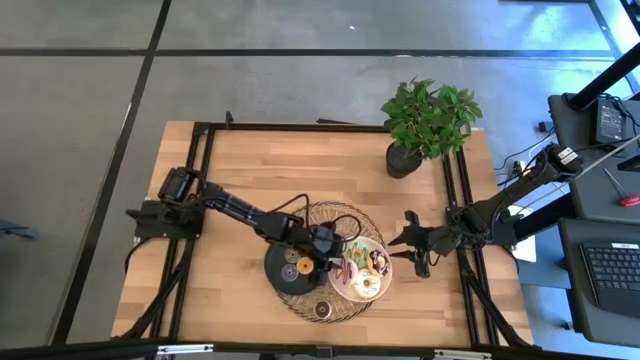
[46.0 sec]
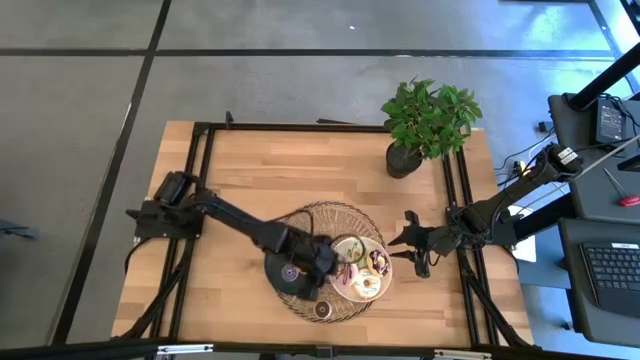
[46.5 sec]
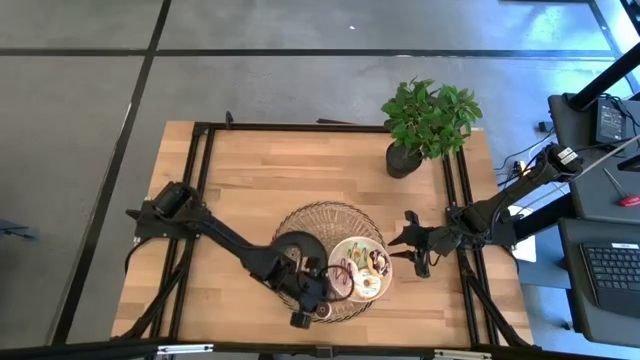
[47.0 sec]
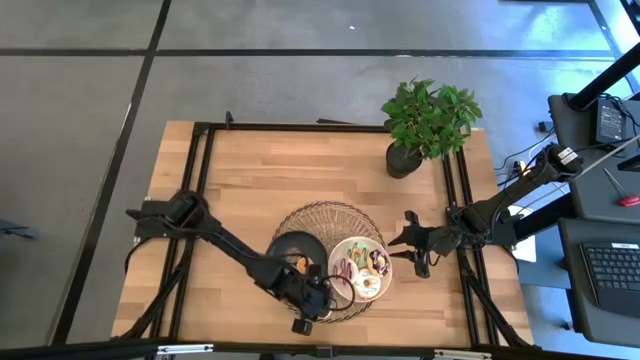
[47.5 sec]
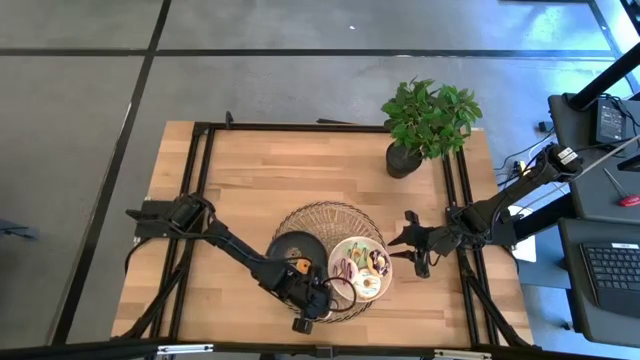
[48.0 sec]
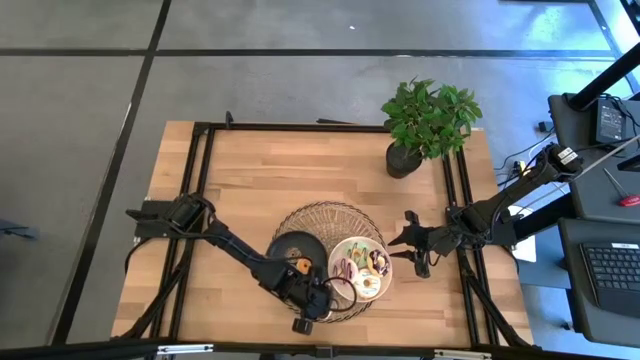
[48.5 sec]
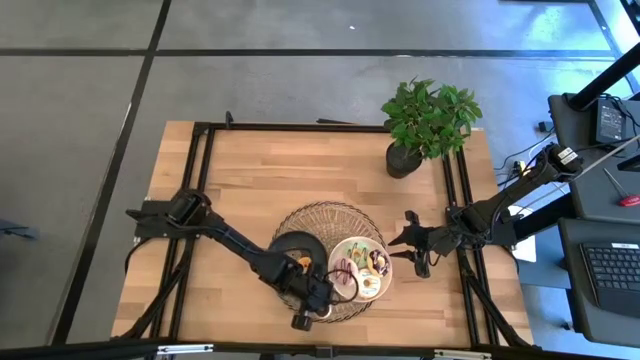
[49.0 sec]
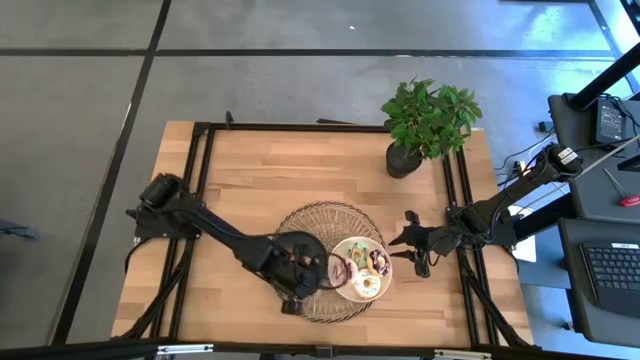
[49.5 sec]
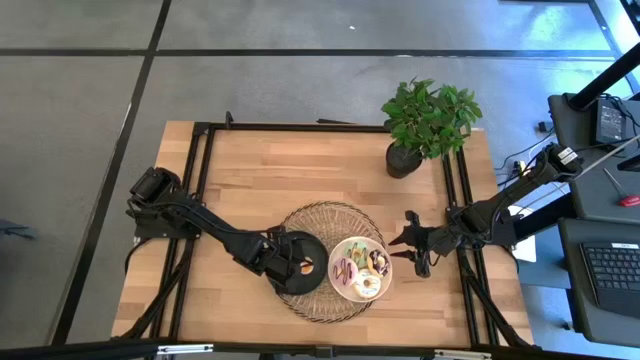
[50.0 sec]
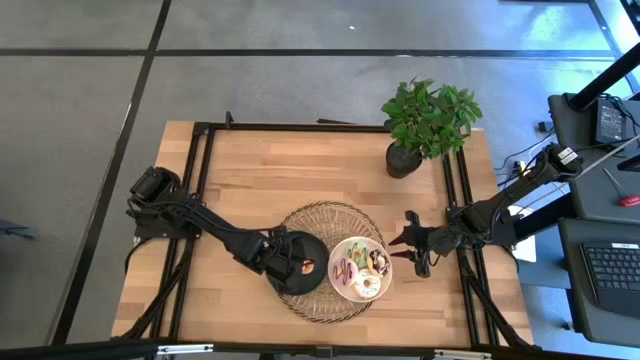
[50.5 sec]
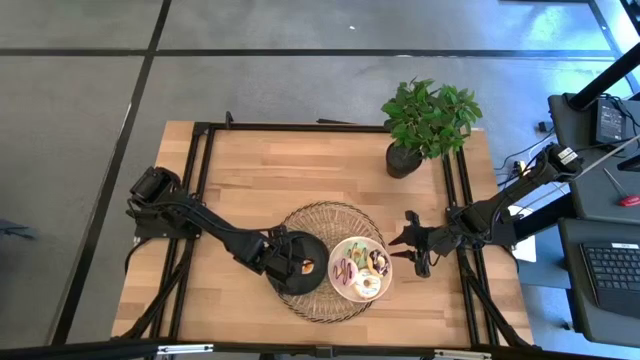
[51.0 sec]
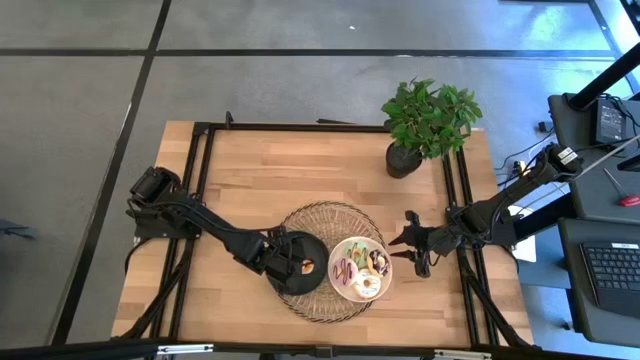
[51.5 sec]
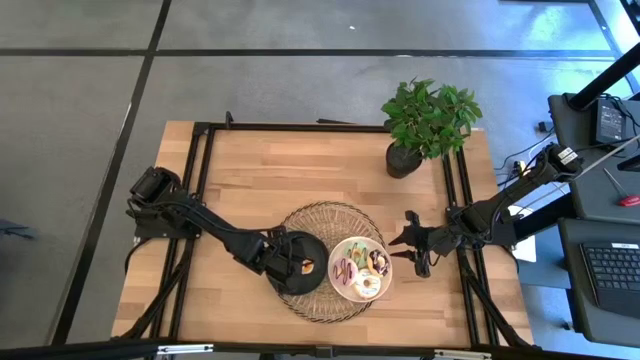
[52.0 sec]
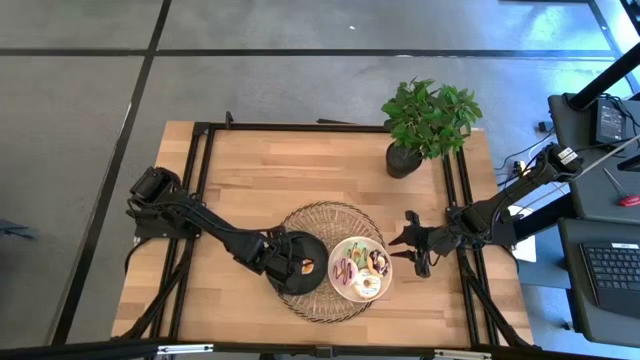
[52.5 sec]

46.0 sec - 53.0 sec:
Task: Pick & Place donuts
Put the small dark brown donut into the black plate

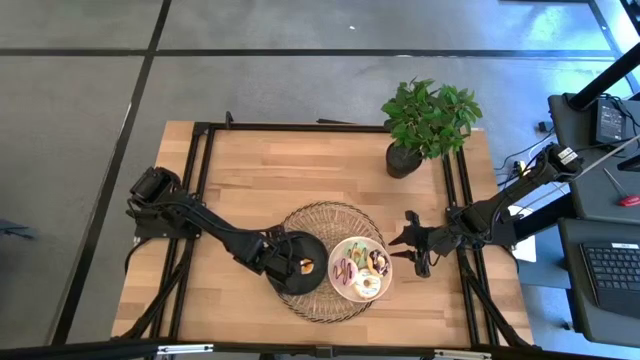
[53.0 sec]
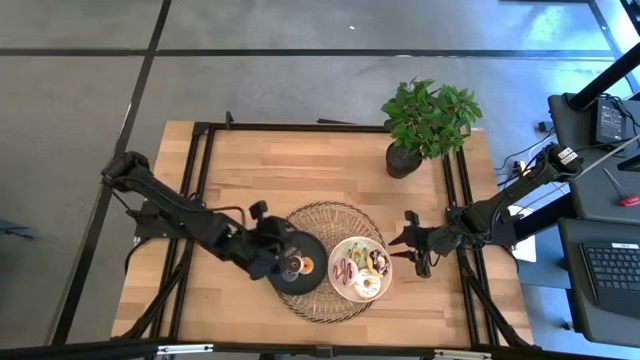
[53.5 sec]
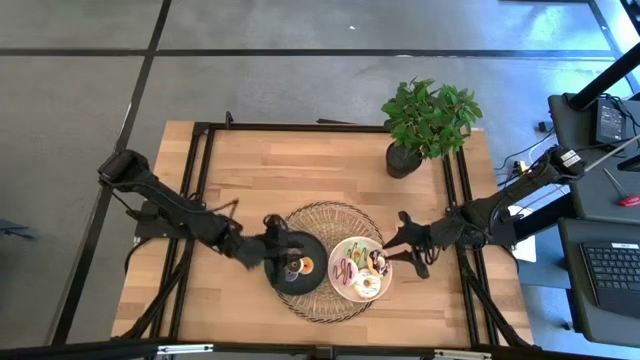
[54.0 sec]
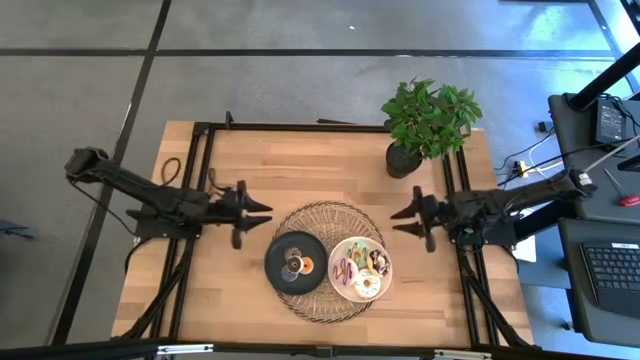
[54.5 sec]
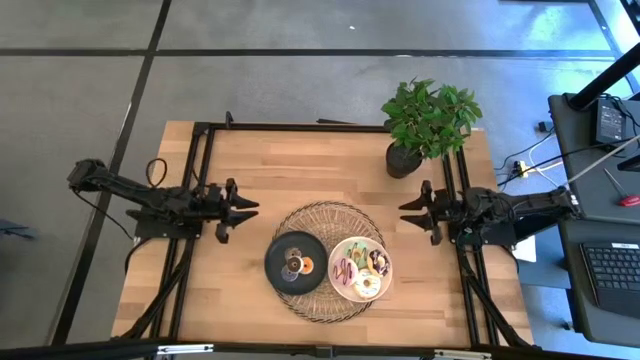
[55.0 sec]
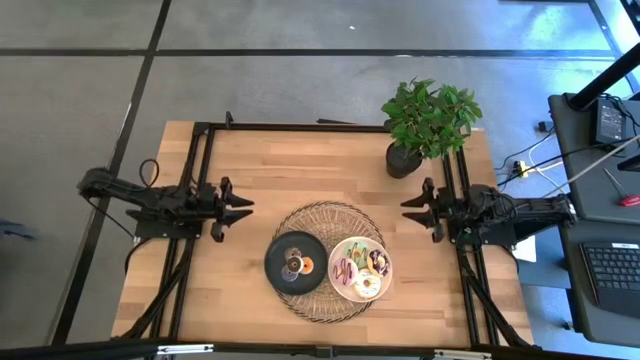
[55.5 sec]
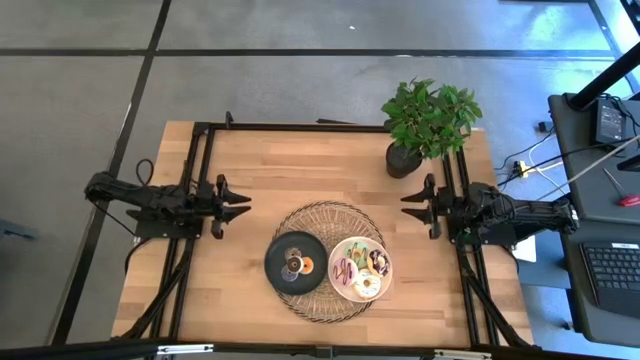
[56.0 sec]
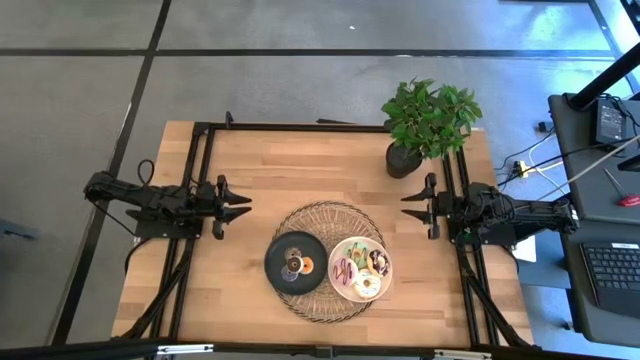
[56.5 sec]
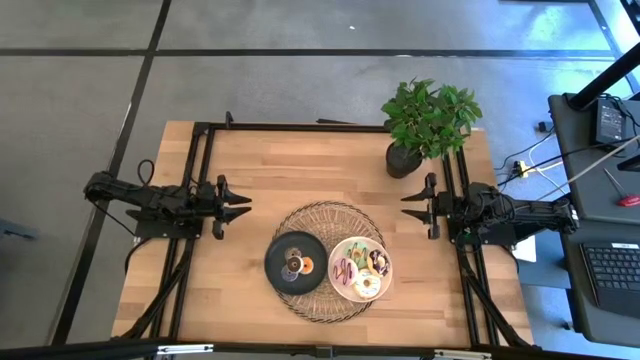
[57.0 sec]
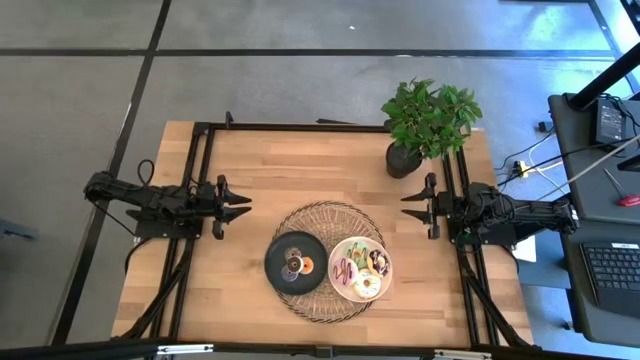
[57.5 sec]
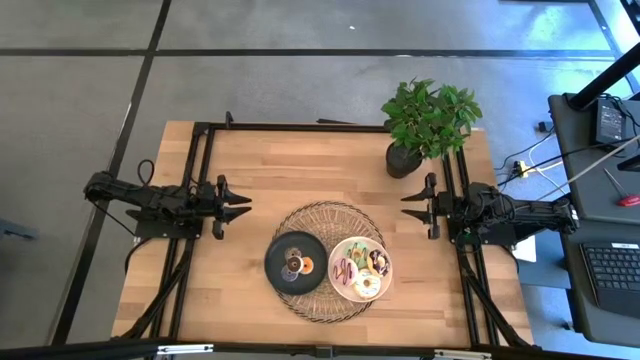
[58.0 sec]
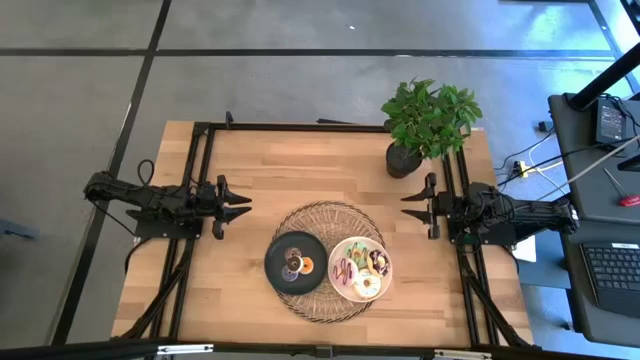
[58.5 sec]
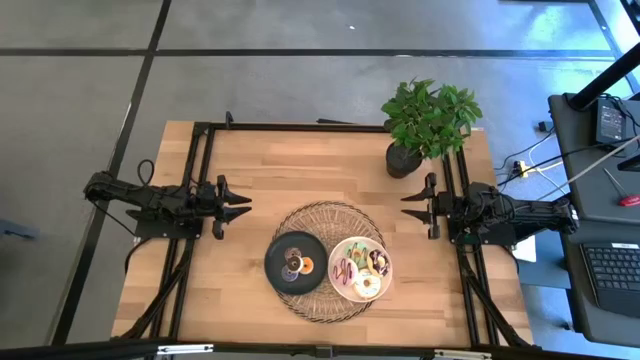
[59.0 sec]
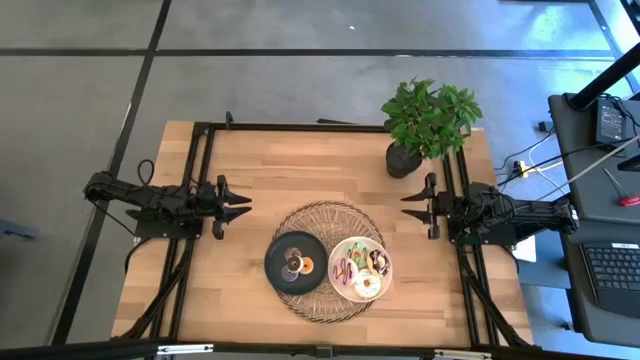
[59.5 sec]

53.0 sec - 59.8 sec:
Return to Home Position

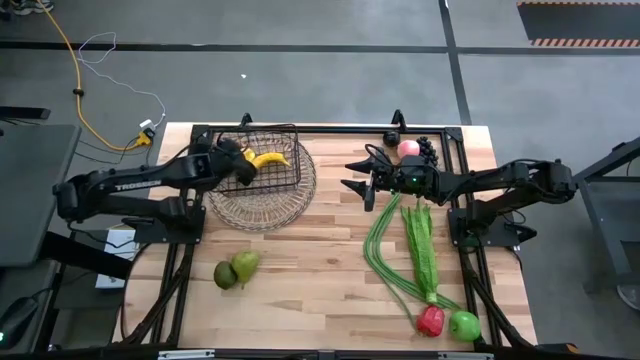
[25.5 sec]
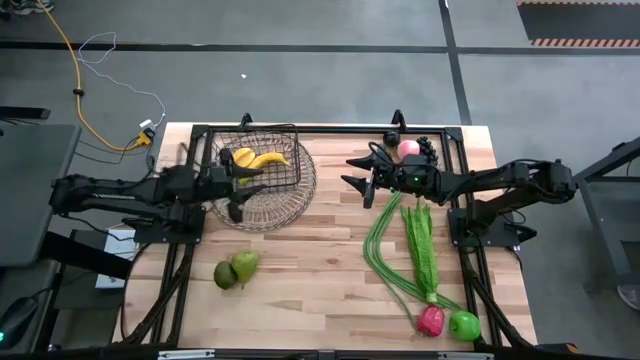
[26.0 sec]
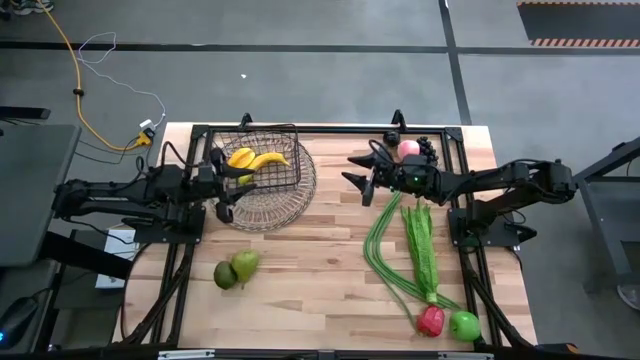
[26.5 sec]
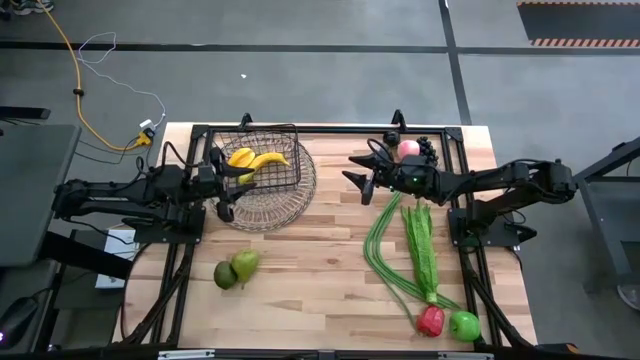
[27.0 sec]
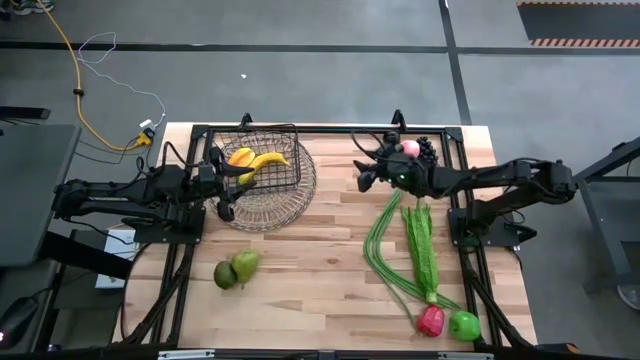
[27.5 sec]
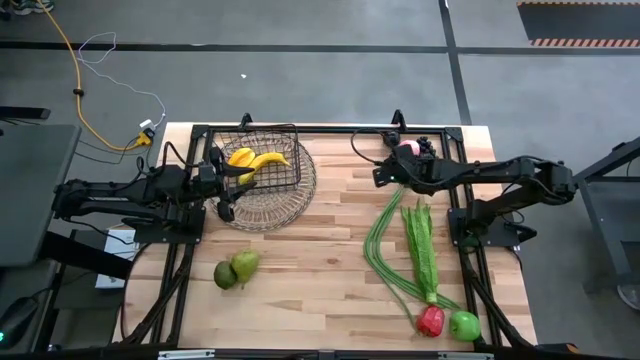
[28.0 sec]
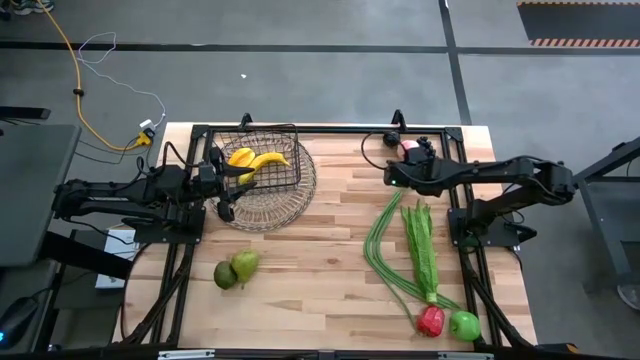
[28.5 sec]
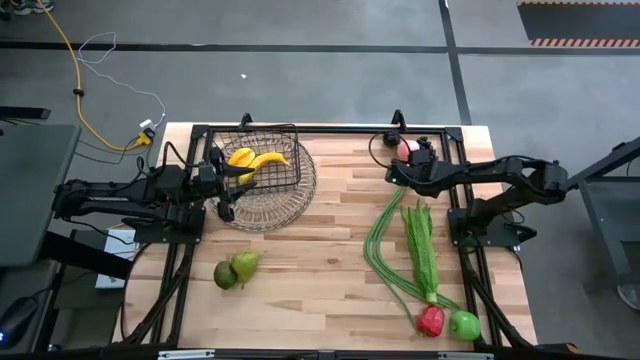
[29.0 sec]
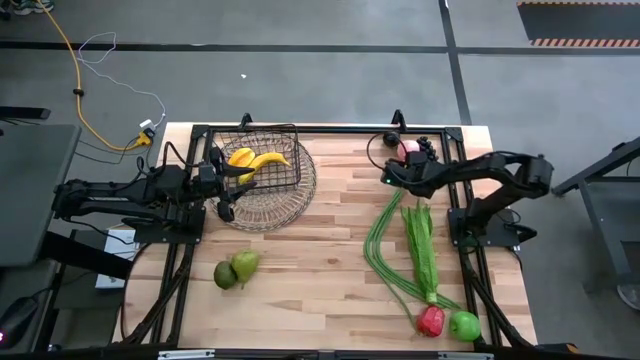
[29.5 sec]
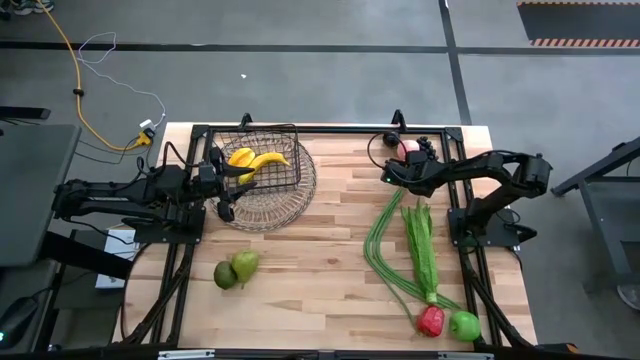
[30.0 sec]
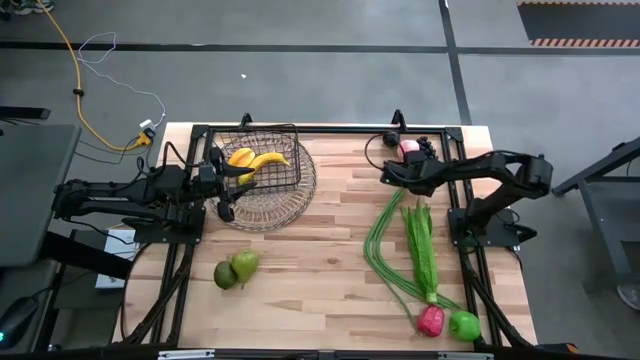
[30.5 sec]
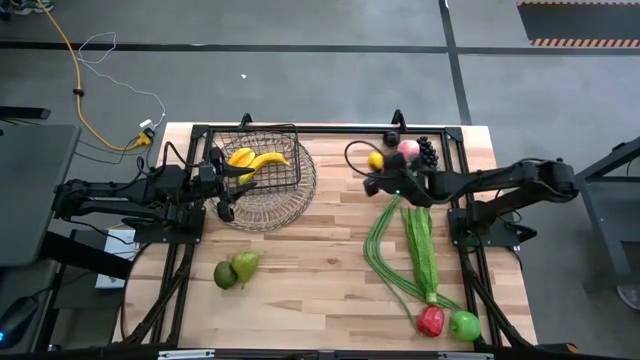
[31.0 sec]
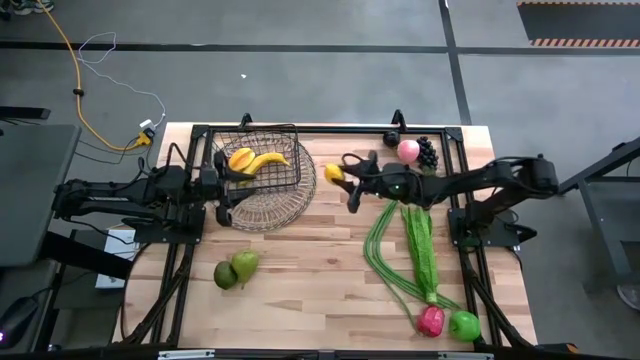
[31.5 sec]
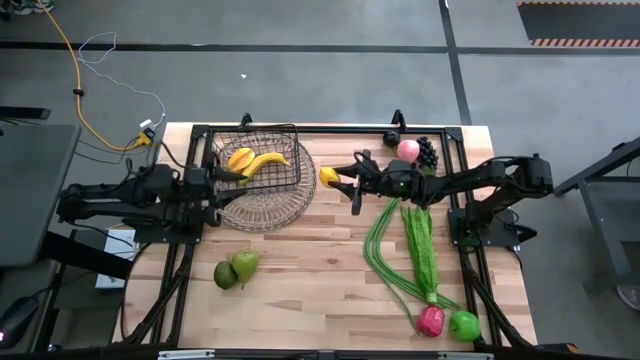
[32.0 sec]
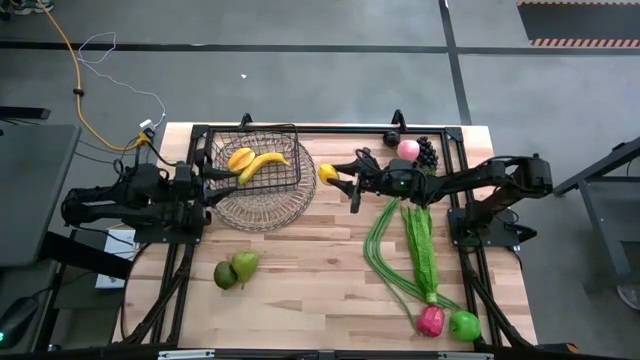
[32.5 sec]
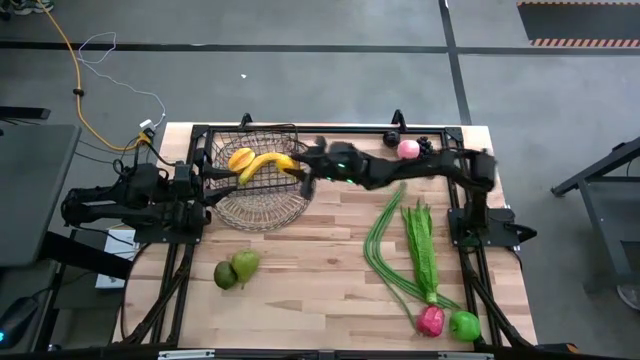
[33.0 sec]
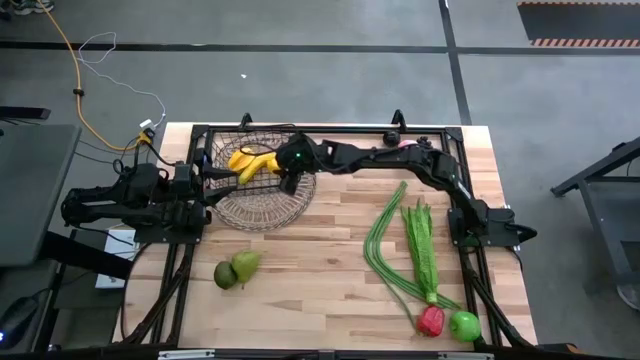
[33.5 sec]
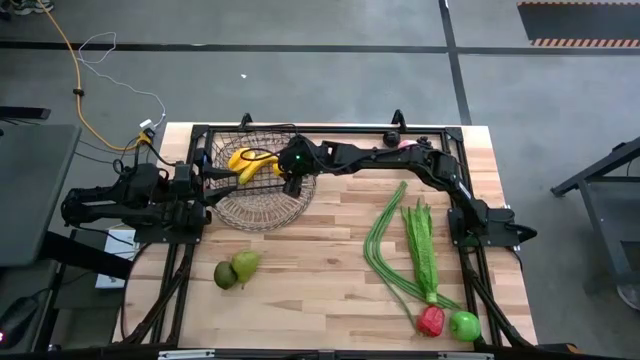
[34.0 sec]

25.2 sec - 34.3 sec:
Task: Build produce basket
Put the yellow lemon into the wire basket
